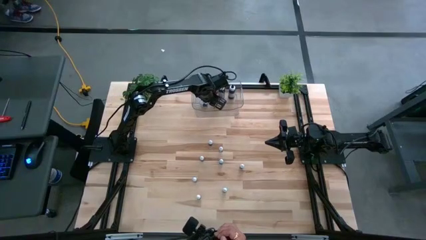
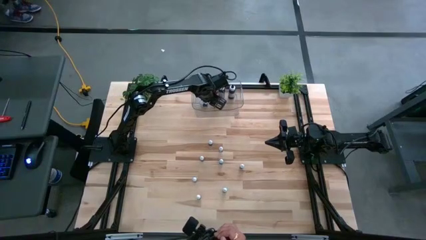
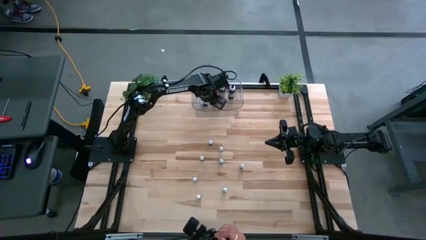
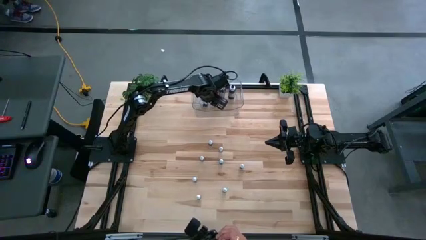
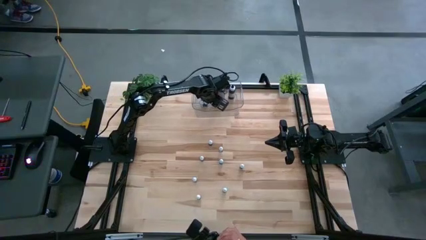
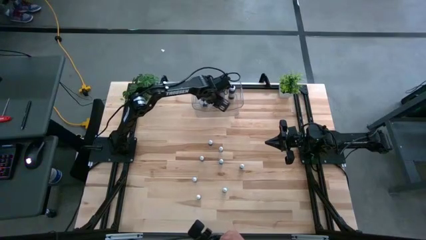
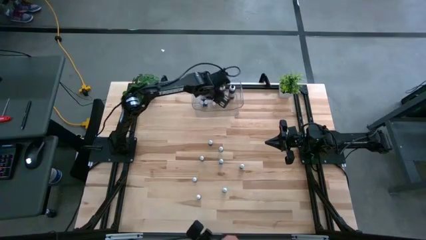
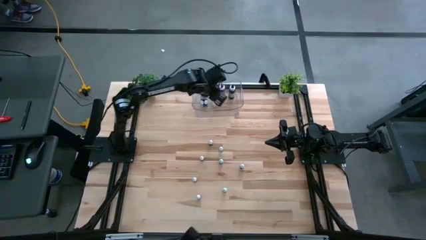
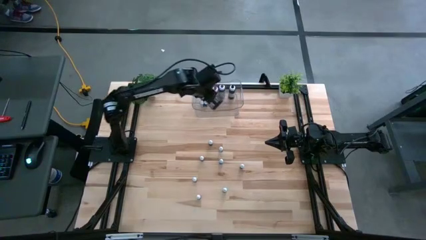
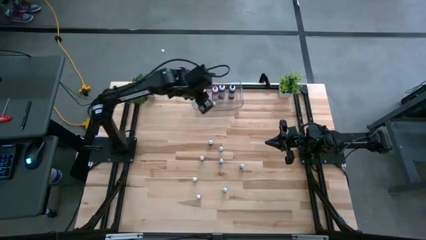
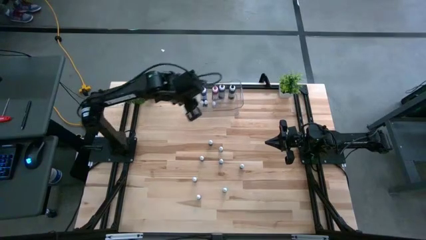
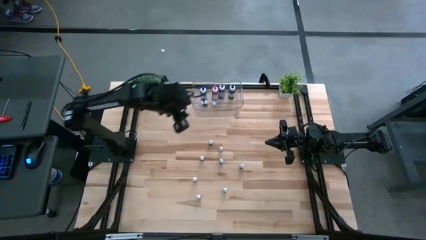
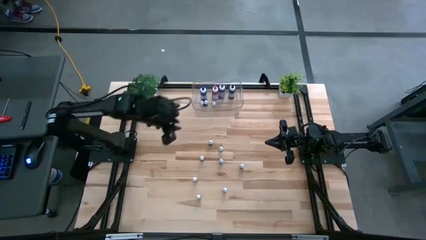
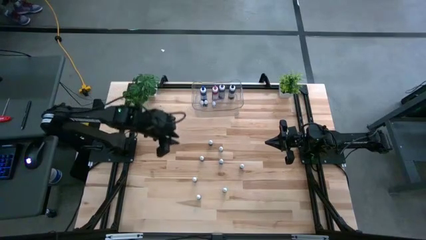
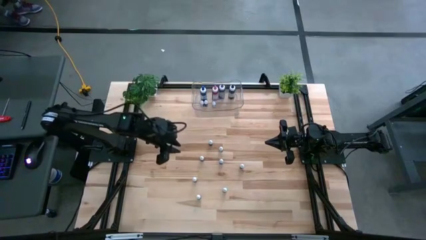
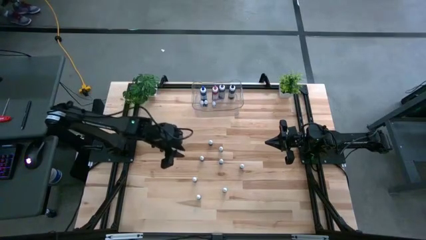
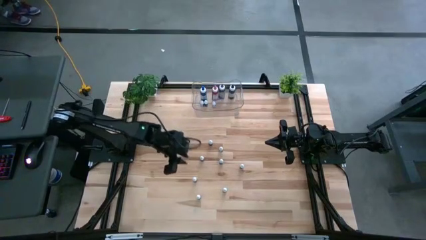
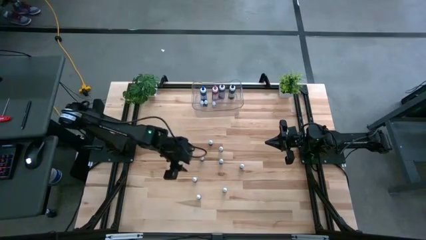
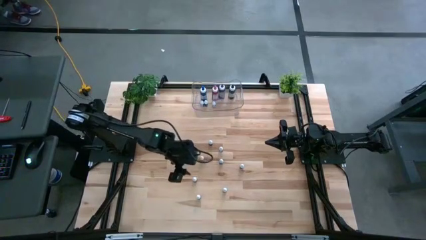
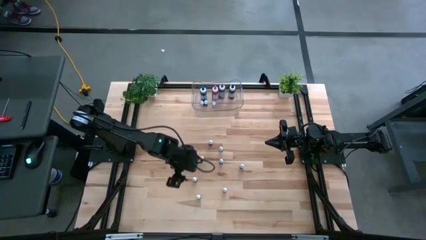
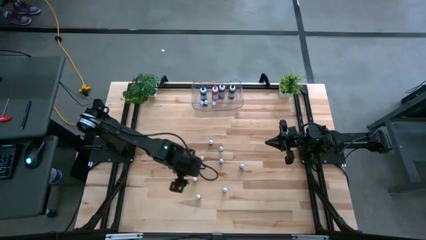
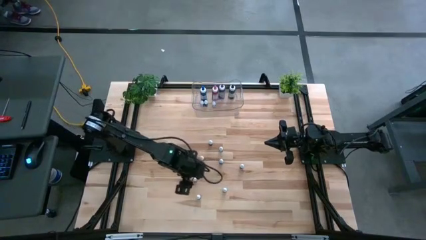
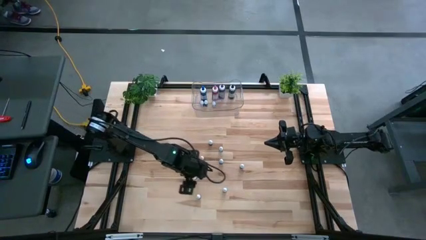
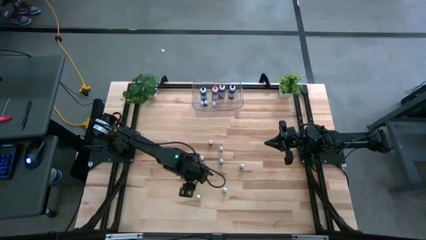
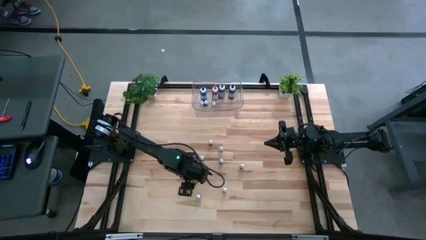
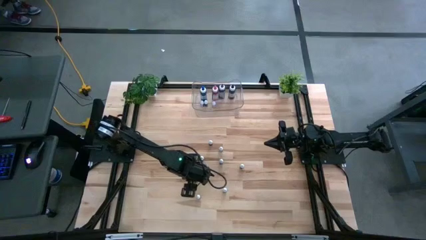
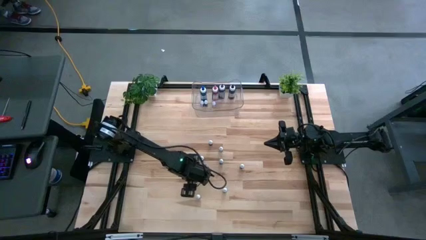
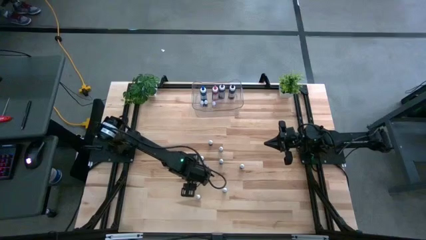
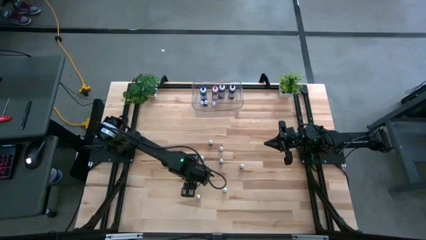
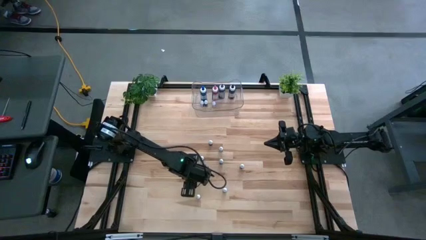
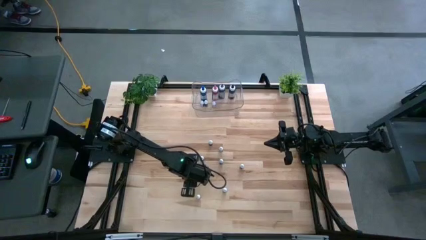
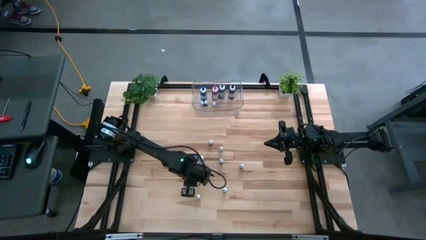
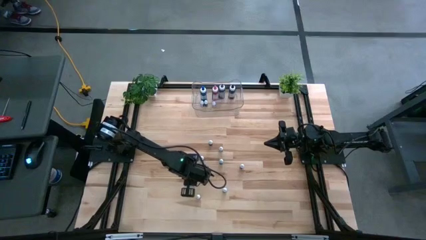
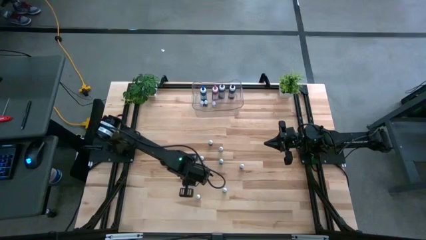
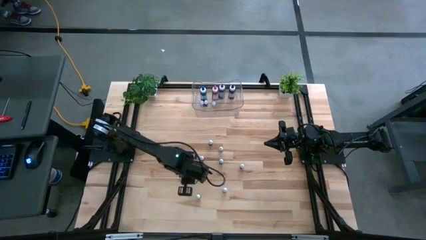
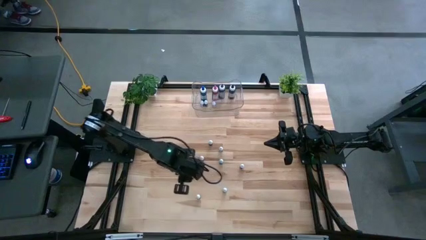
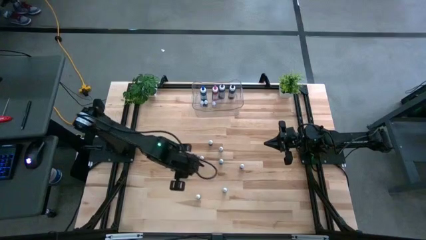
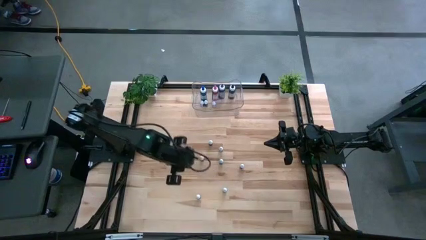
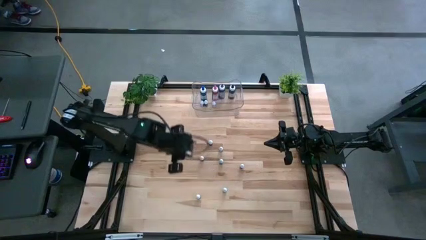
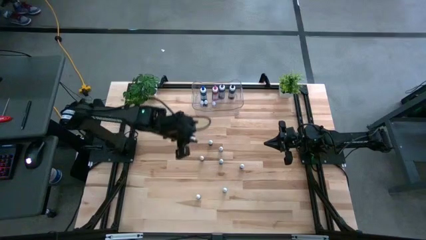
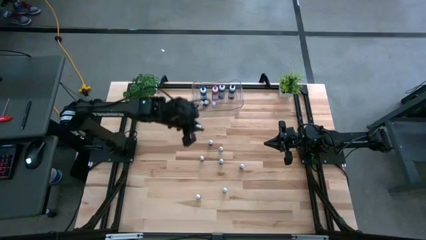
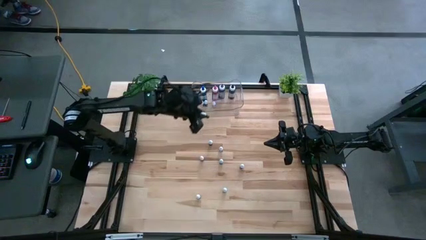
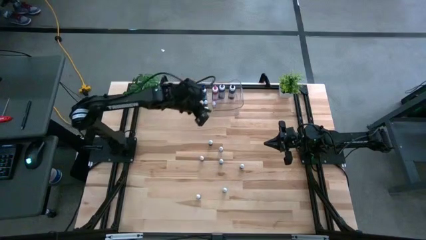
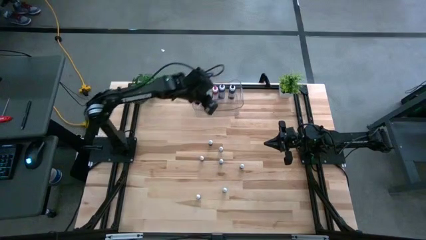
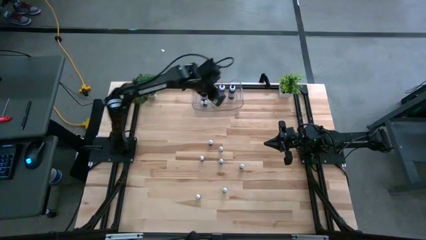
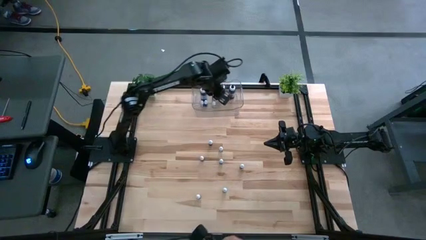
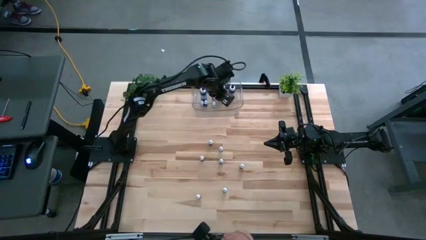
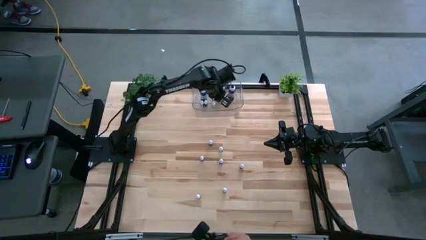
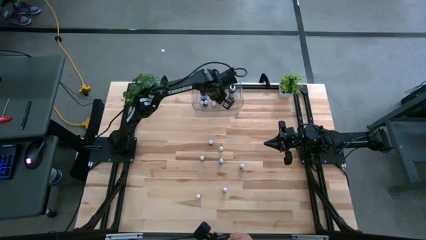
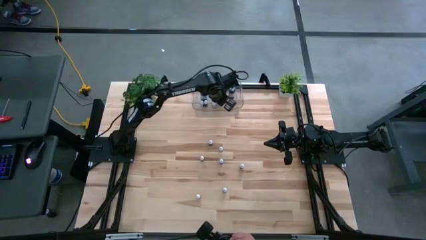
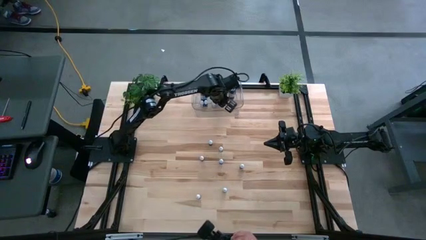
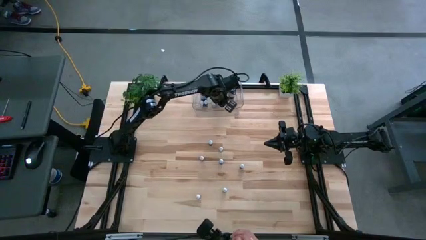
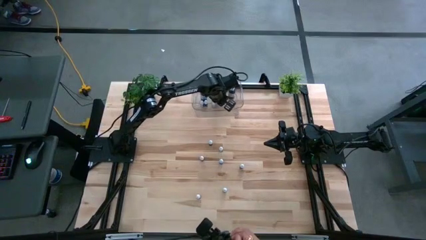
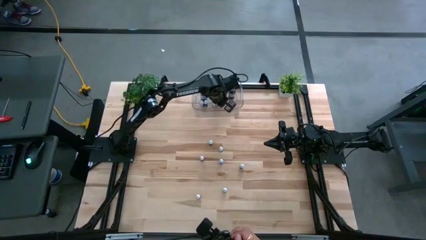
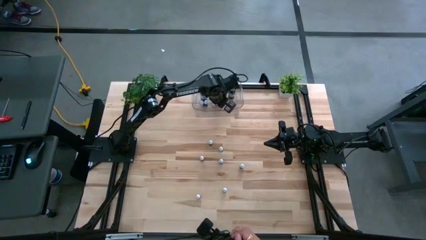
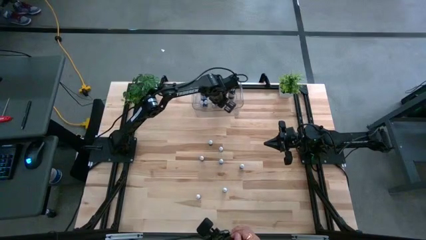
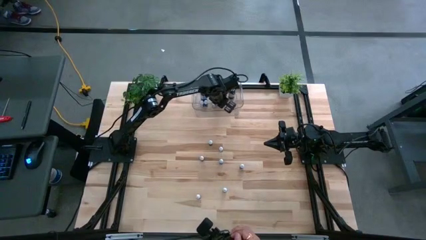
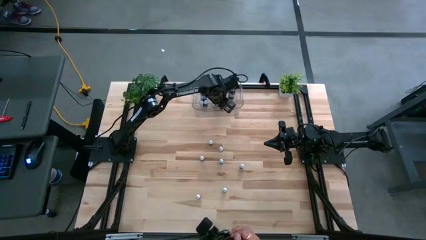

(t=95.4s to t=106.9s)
Task: Pick & Place food coloring
Put the small green food coloring bottle into the transparent bin
